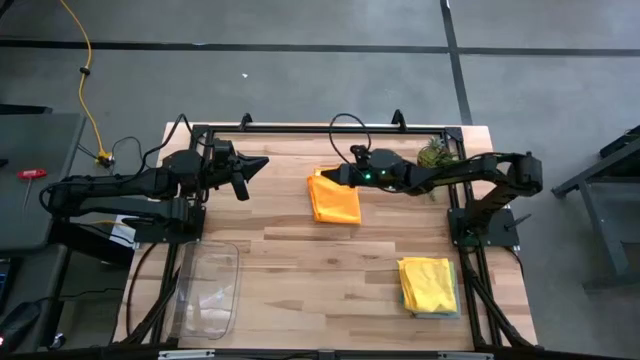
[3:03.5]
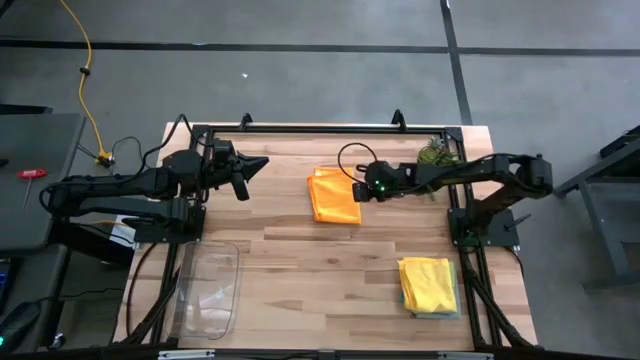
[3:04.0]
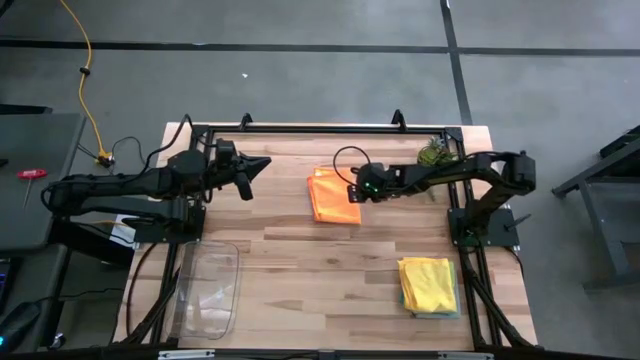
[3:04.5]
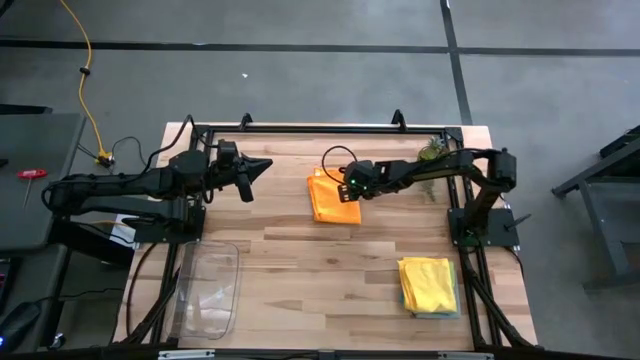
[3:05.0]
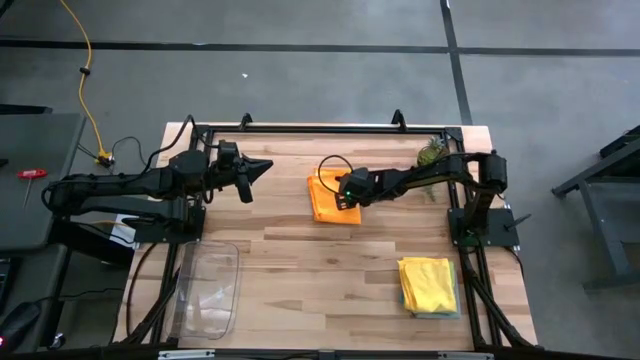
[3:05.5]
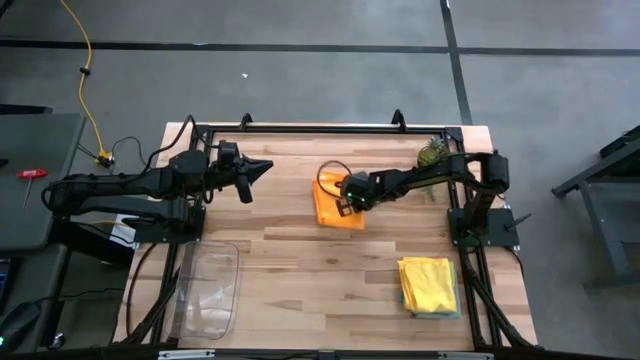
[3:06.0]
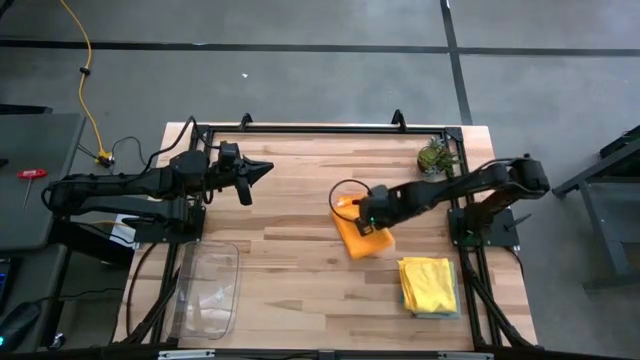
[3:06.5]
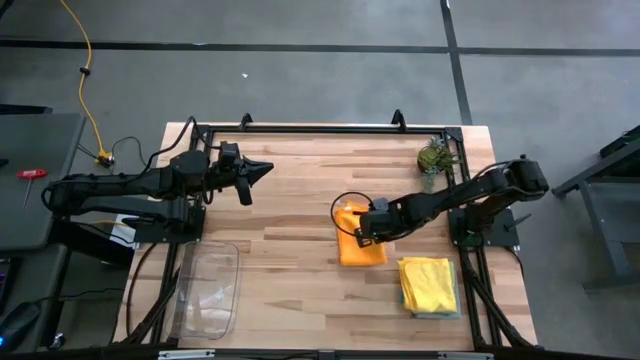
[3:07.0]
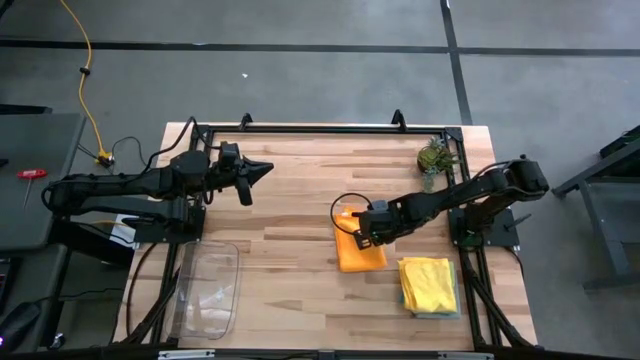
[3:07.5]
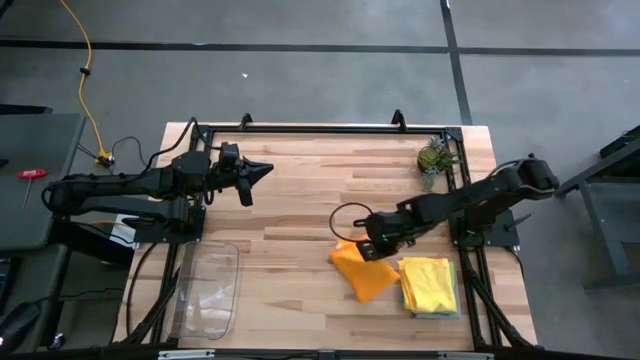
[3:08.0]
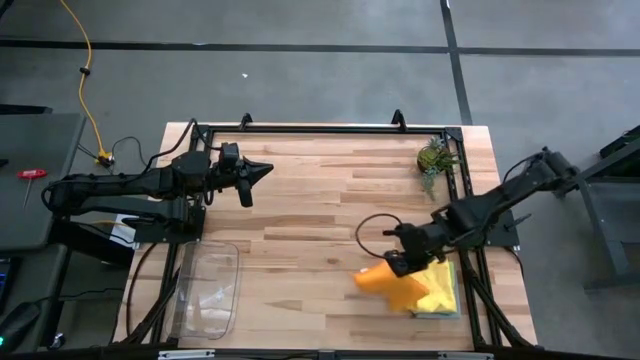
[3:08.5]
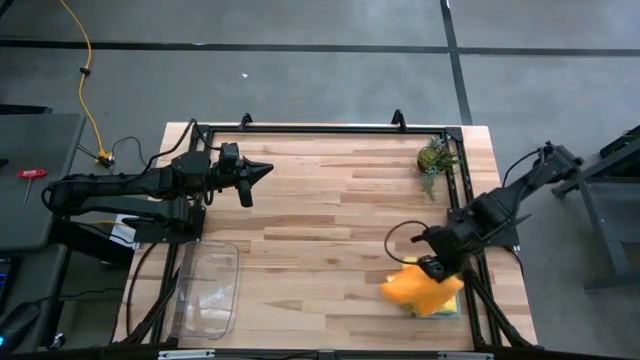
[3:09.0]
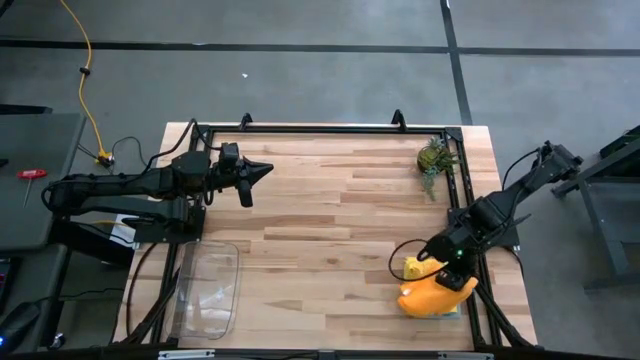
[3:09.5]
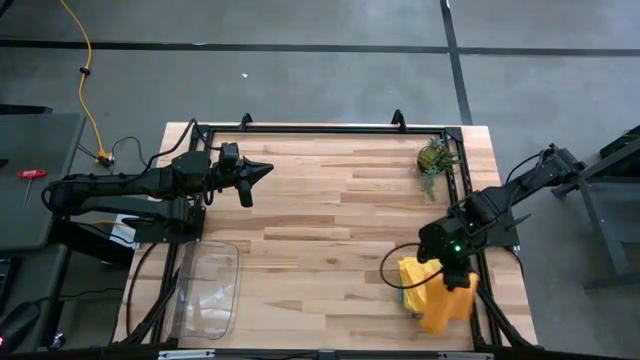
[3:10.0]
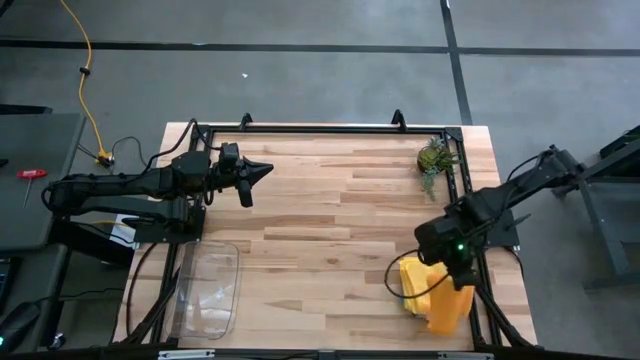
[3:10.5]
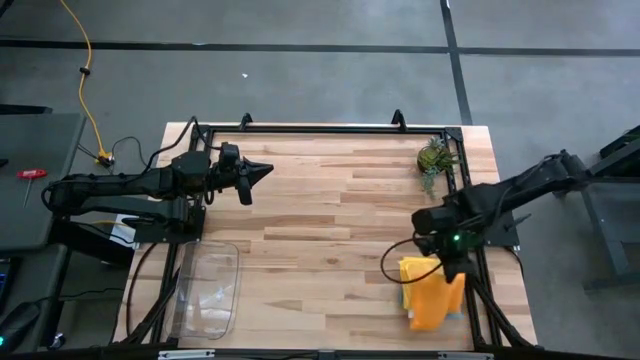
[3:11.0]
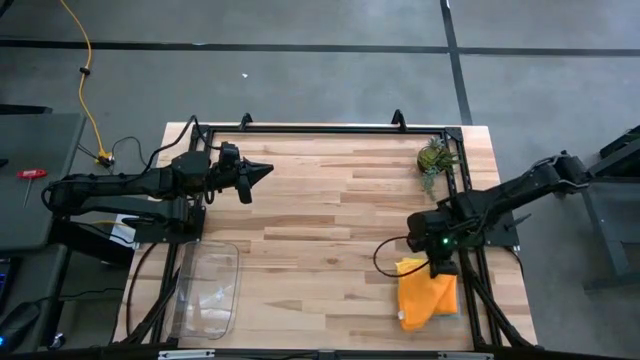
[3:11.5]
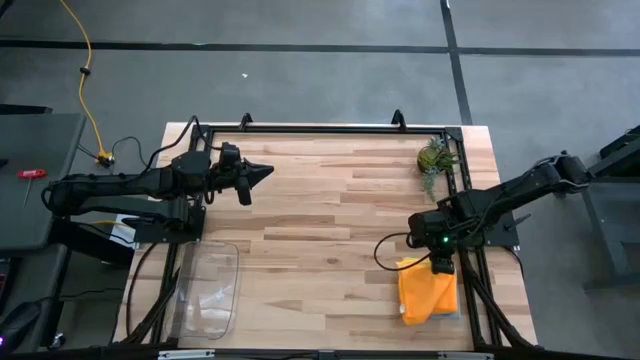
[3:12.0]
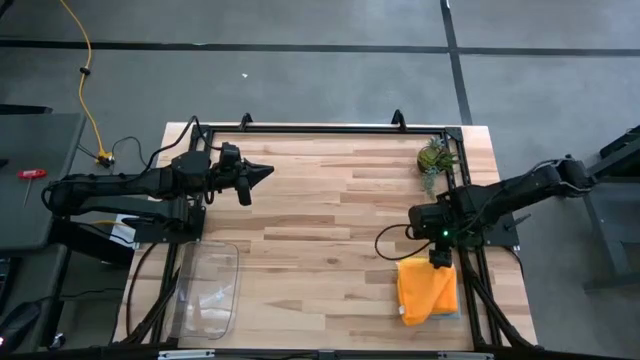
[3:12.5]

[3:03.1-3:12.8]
Task: Fold microfiber towels
Stack the orange microfiber cloth on top of the yellow microfiber cloth

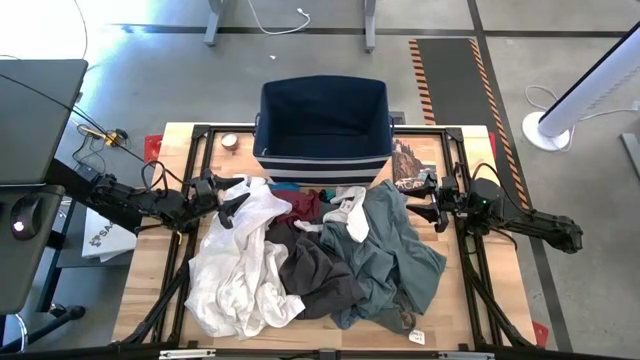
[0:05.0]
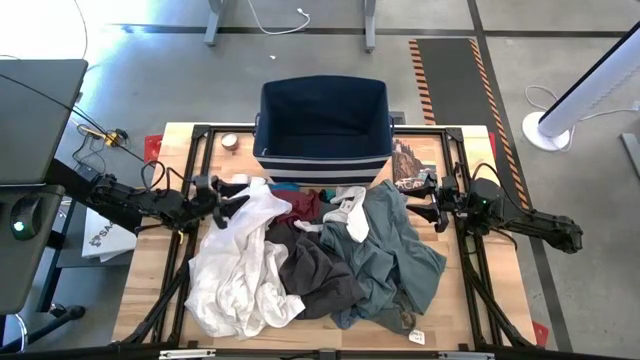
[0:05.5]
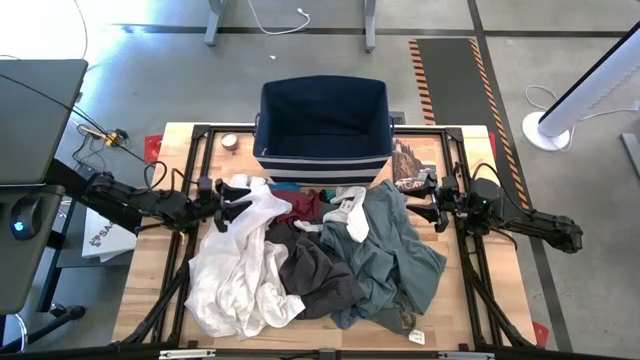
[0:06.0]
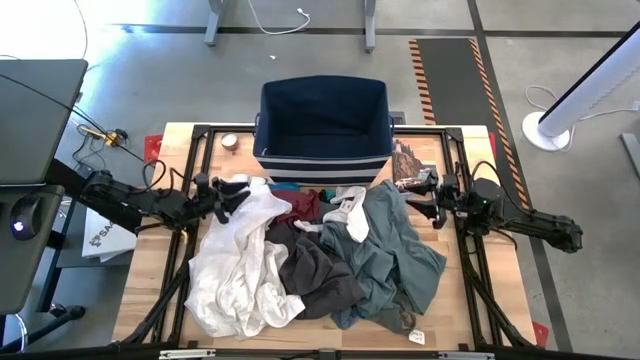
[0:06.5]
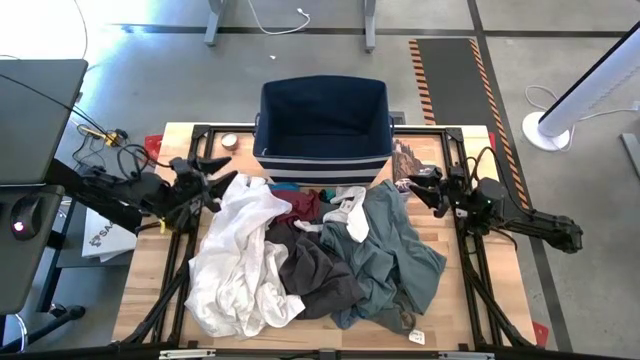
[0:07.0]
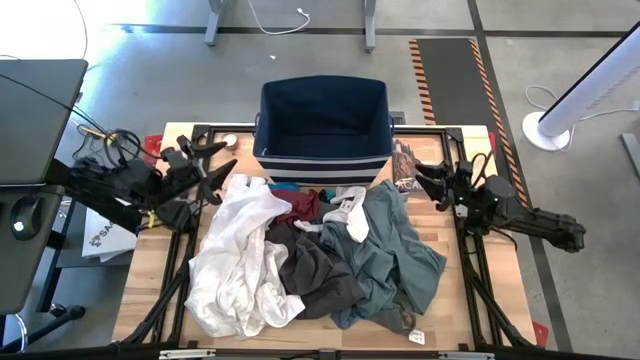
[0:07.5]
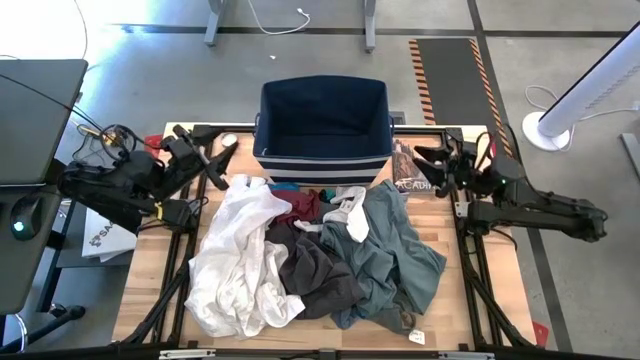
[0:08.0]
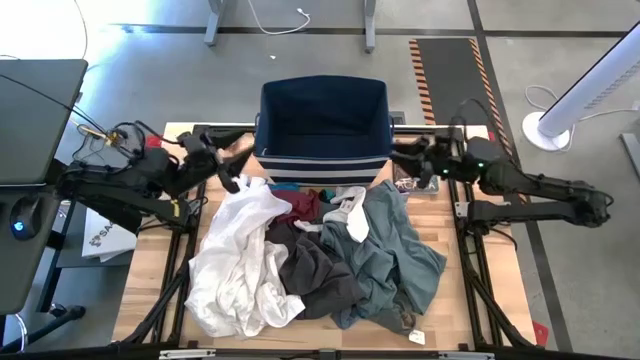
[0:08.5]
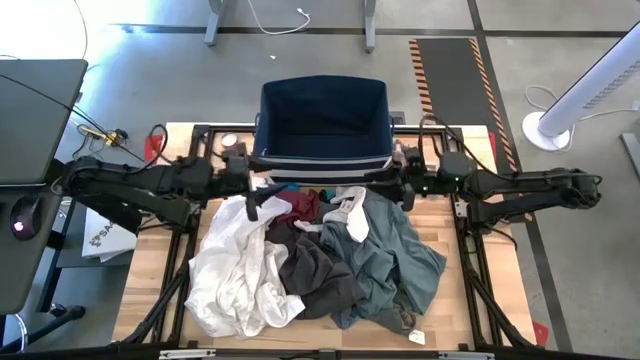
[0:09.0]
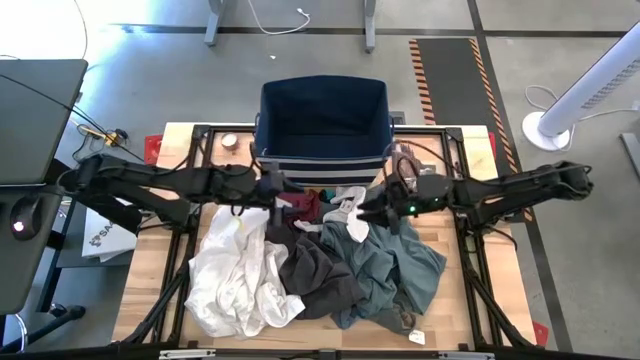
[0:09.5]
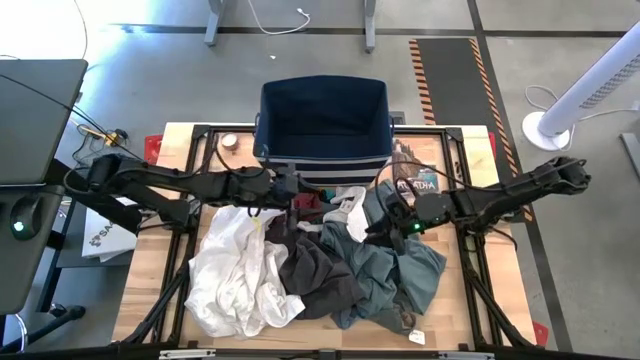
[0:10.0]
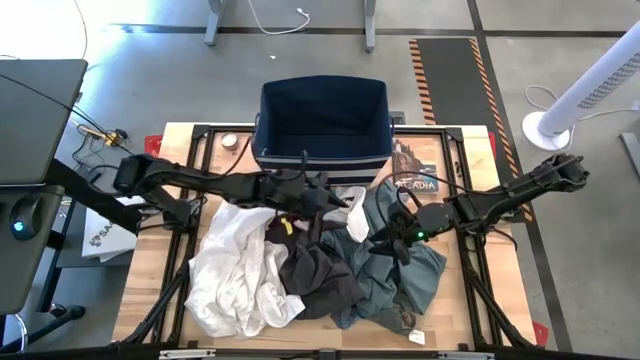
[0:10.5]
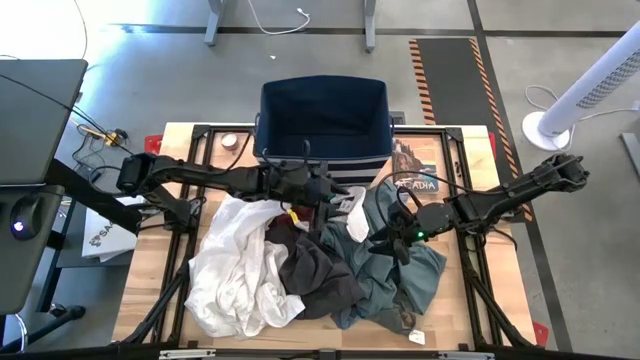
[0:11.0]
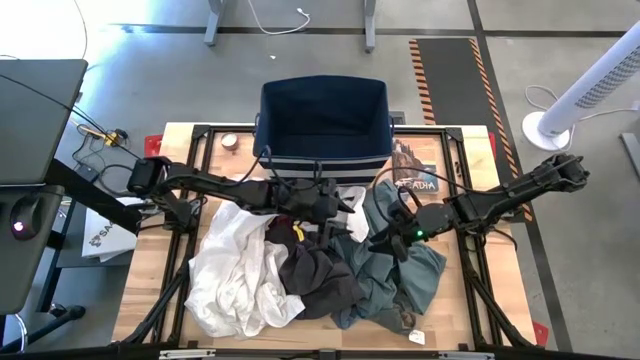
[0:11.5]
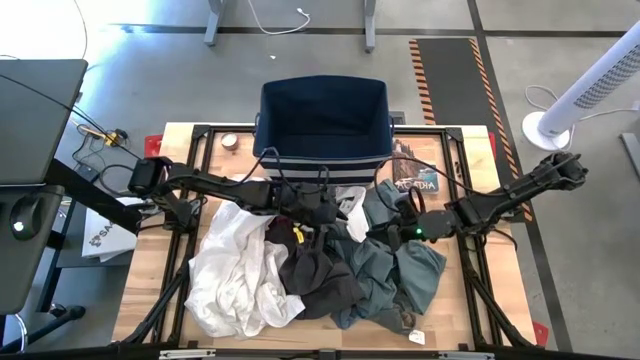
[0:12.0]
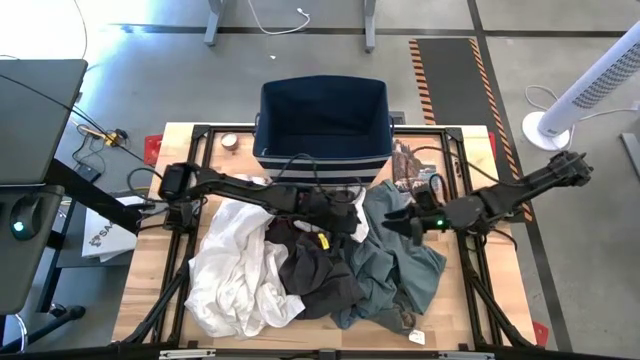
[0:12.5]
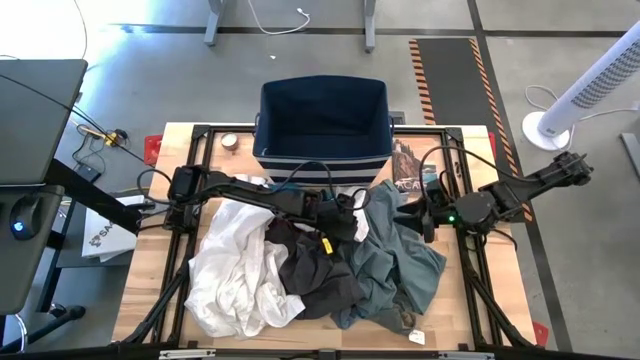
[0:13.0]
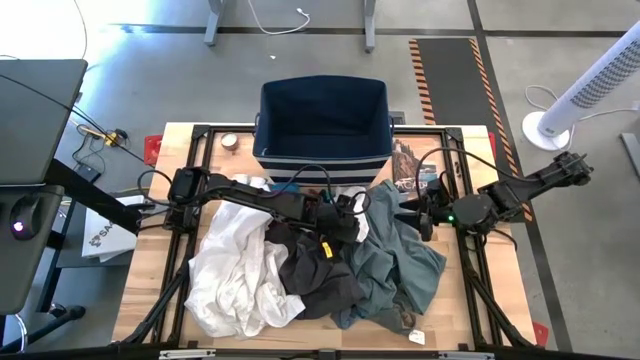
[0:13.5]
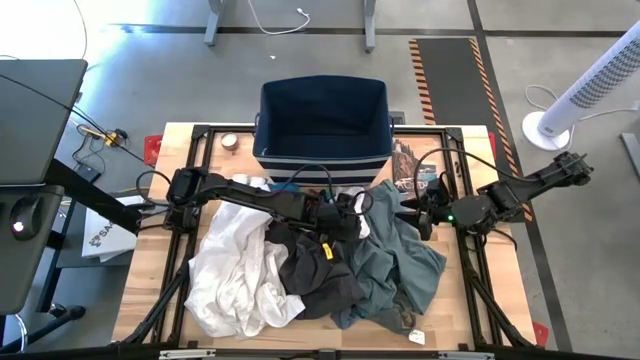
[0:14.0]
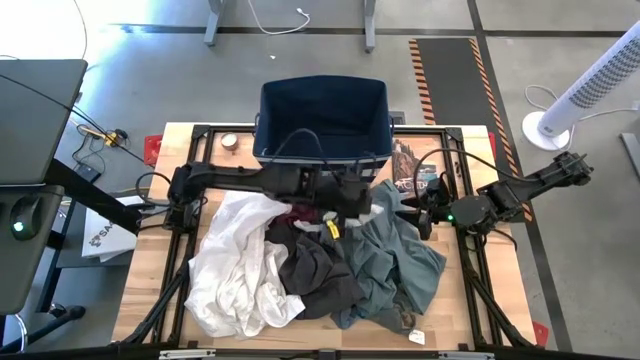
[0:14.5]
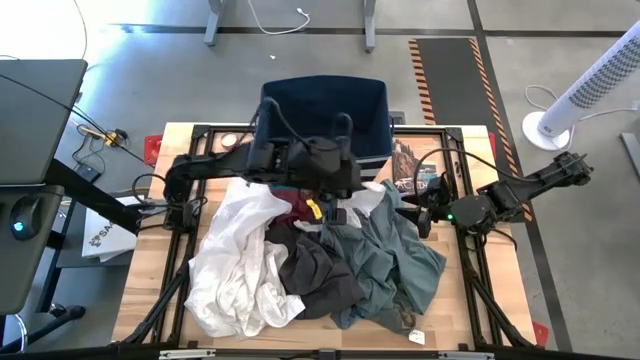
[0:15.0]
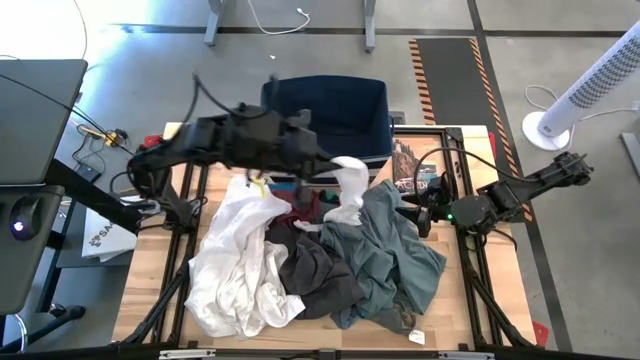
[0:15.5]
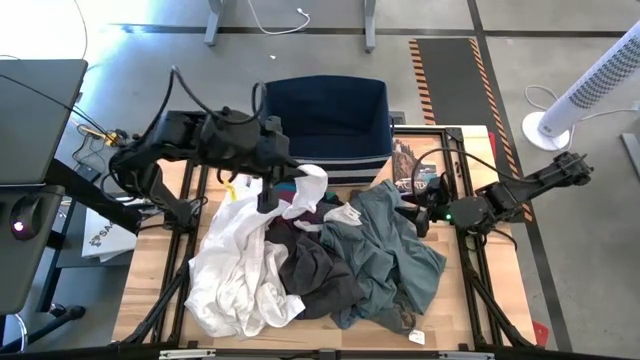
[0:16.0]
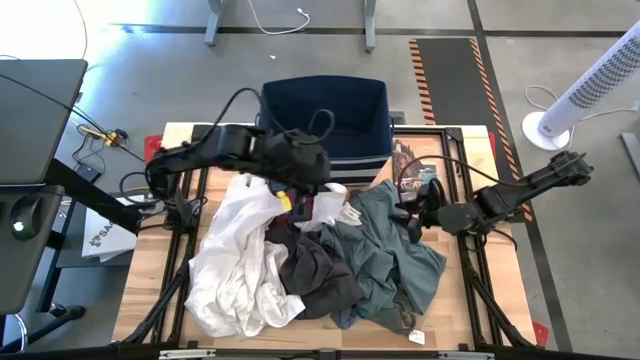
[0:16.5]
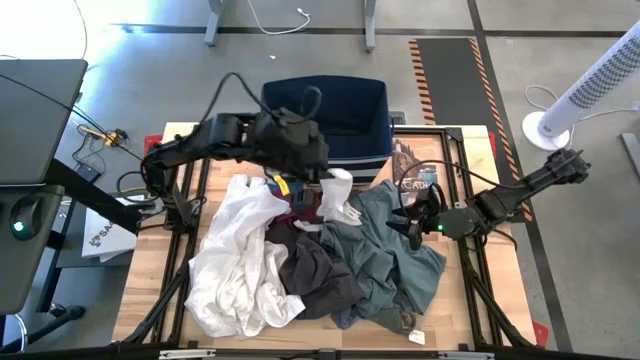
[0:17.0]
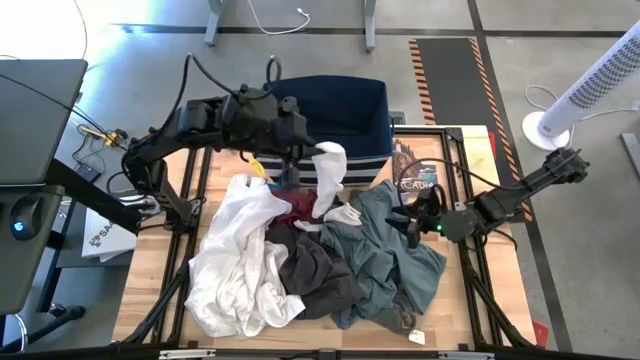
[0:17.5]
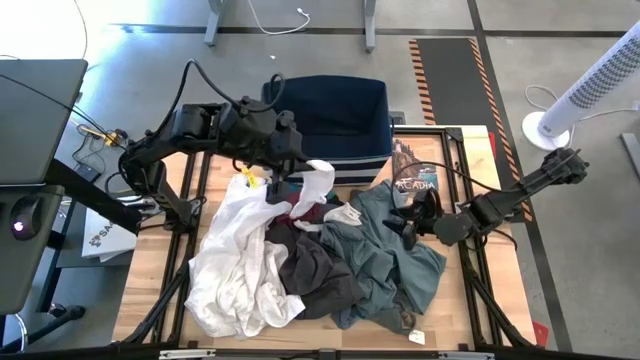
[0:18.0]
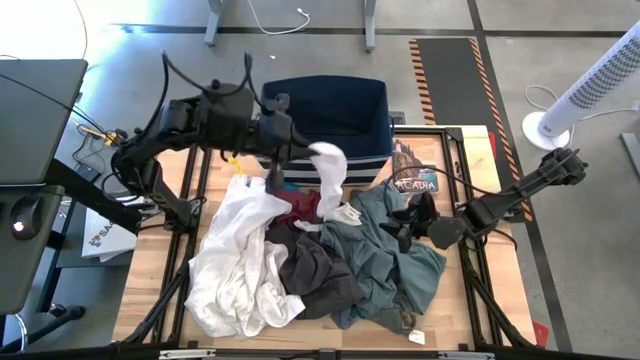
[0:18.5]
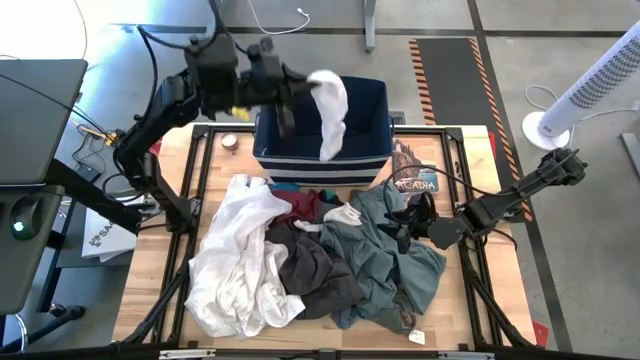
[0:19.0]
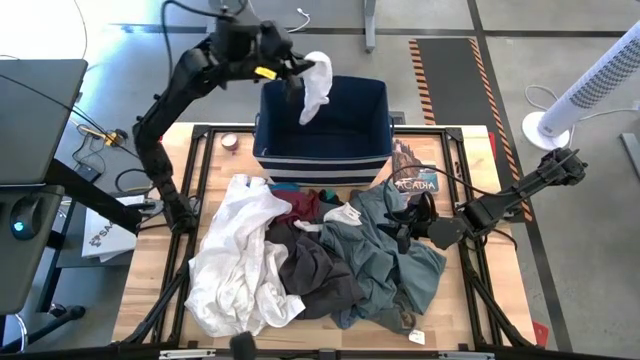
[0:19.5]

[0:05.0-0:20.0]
Task: Sort clothes
Put the white sock into the blue laundry bin
